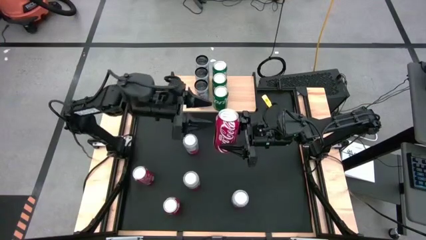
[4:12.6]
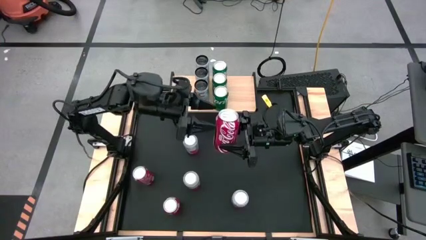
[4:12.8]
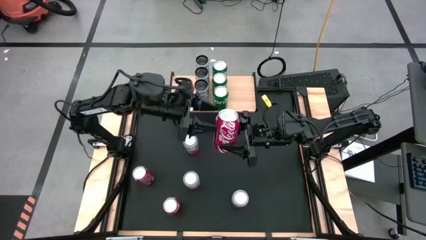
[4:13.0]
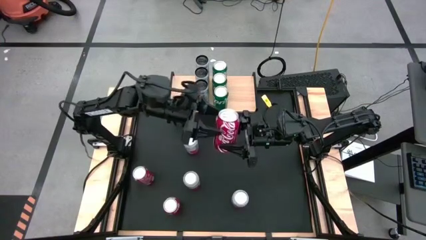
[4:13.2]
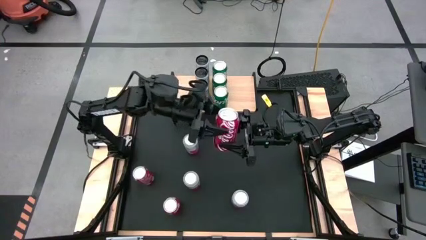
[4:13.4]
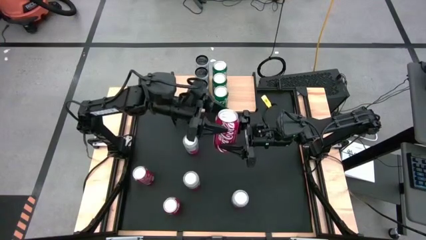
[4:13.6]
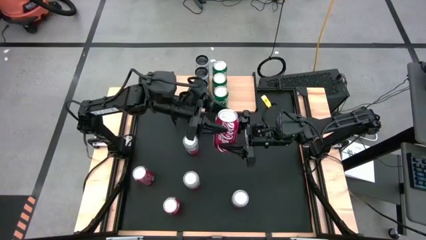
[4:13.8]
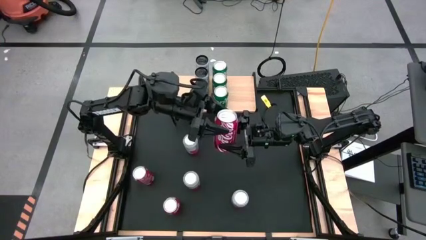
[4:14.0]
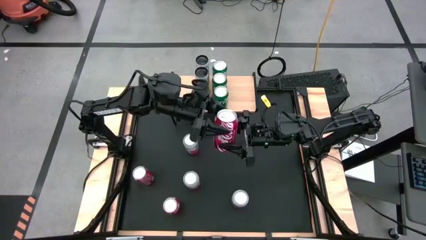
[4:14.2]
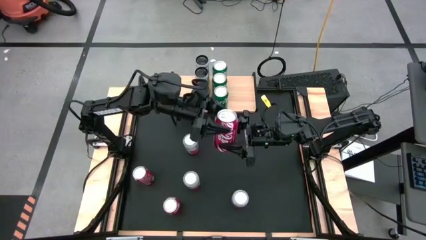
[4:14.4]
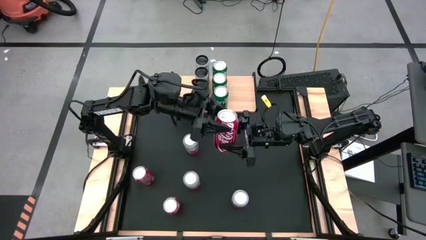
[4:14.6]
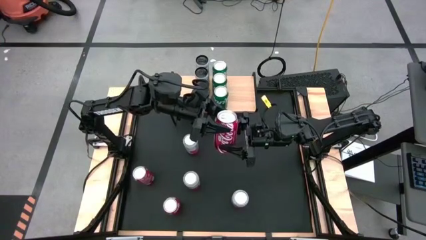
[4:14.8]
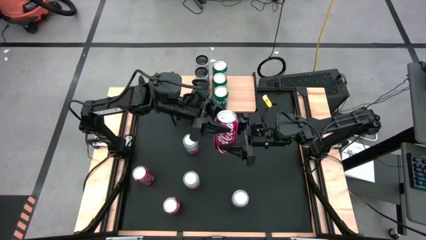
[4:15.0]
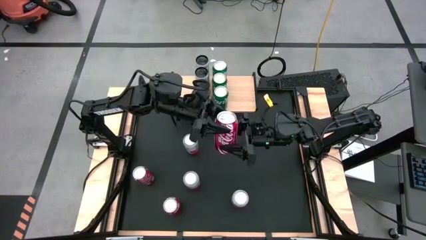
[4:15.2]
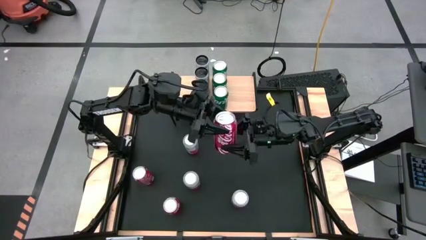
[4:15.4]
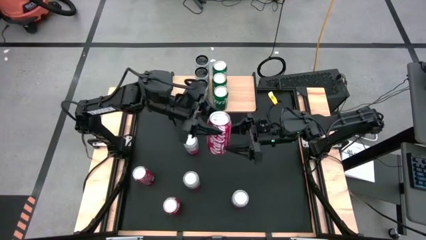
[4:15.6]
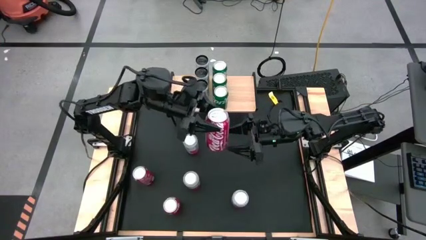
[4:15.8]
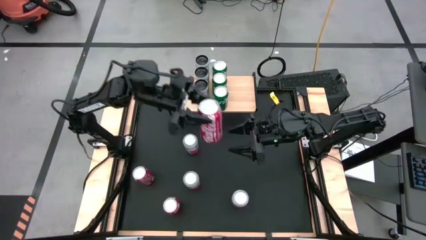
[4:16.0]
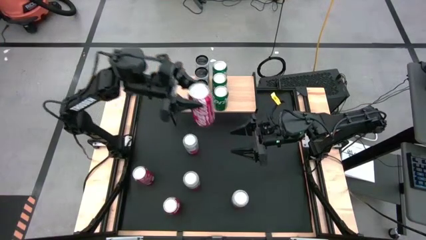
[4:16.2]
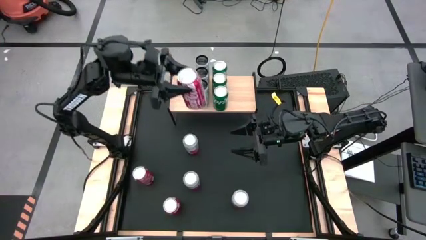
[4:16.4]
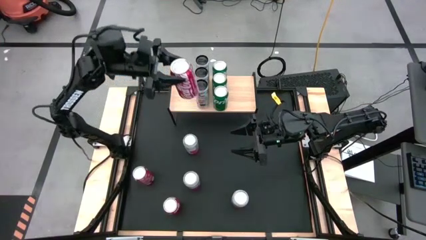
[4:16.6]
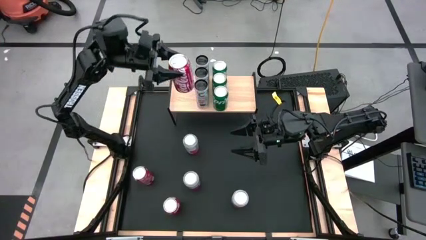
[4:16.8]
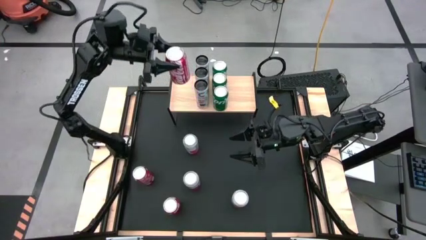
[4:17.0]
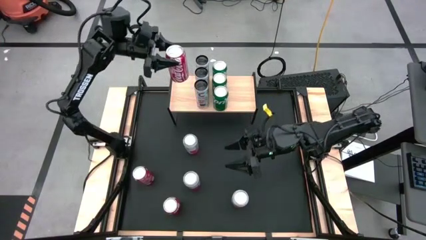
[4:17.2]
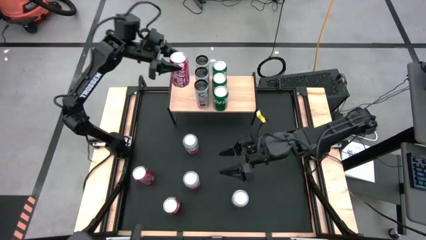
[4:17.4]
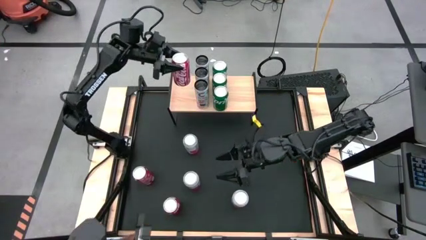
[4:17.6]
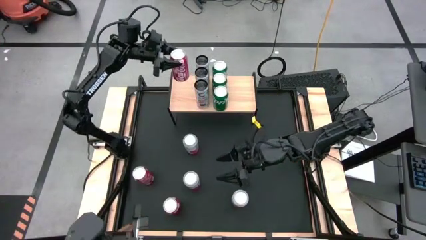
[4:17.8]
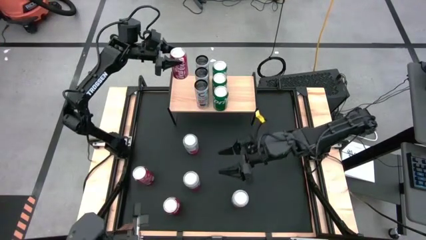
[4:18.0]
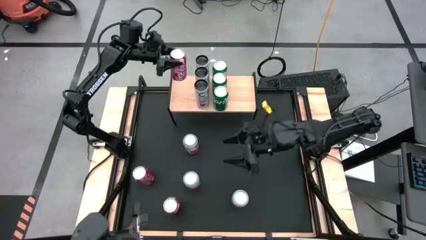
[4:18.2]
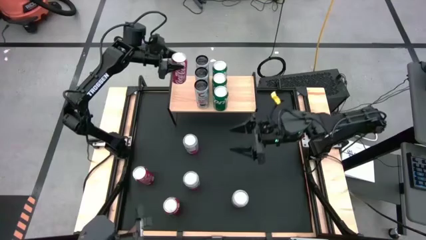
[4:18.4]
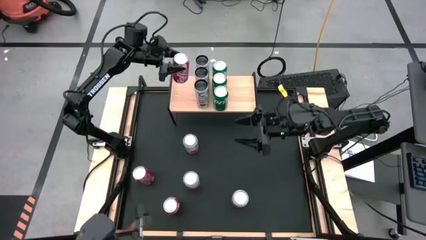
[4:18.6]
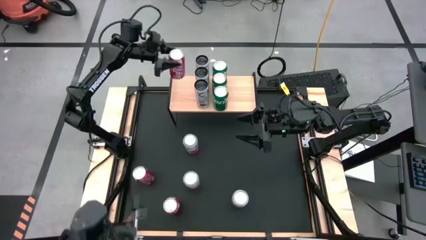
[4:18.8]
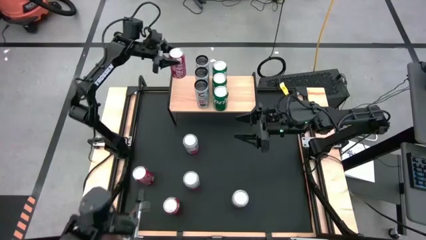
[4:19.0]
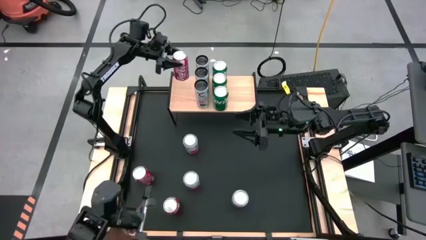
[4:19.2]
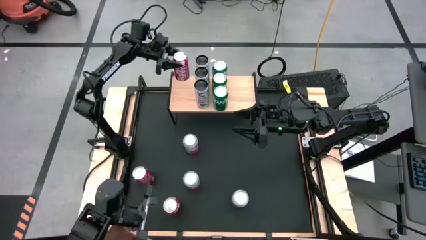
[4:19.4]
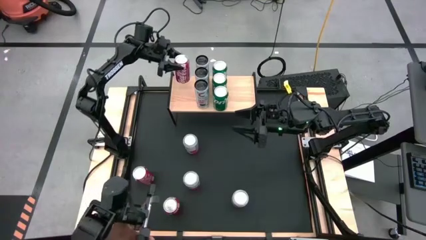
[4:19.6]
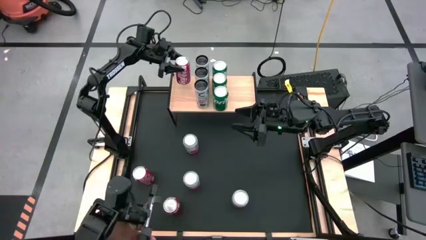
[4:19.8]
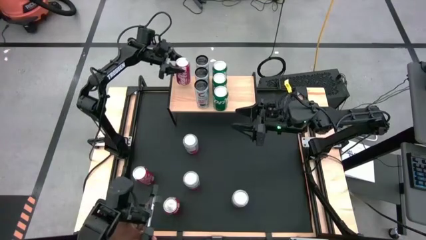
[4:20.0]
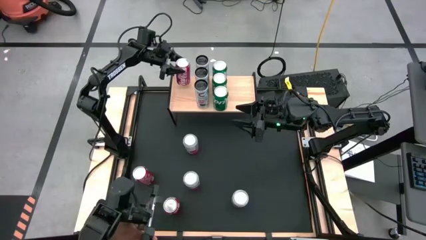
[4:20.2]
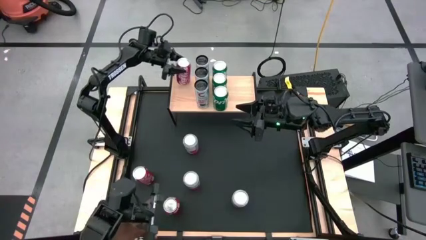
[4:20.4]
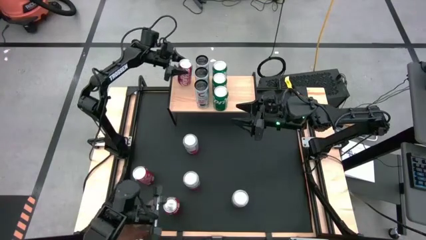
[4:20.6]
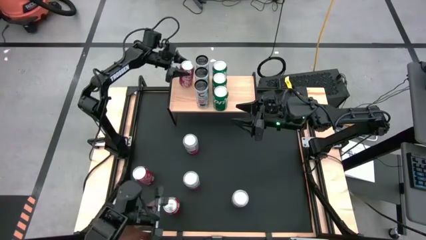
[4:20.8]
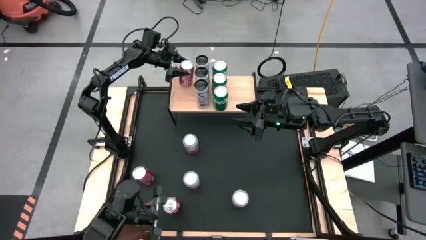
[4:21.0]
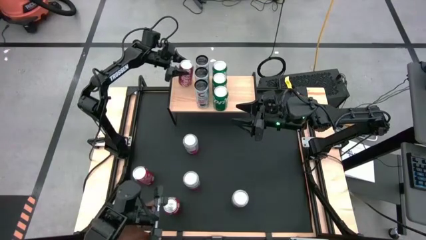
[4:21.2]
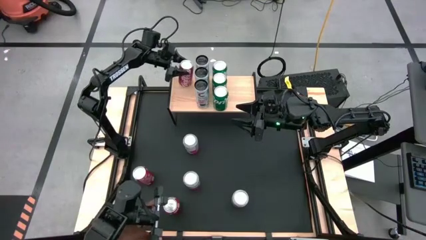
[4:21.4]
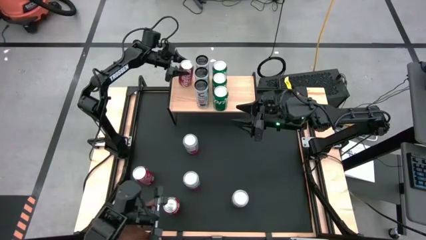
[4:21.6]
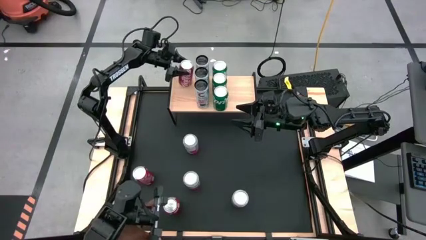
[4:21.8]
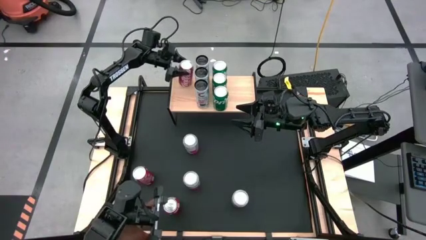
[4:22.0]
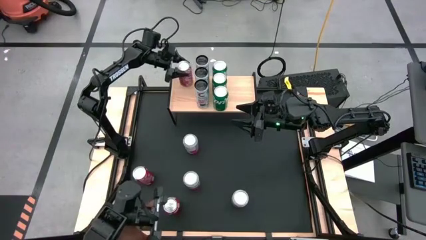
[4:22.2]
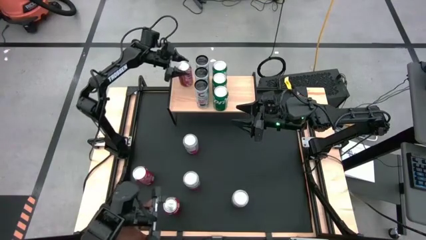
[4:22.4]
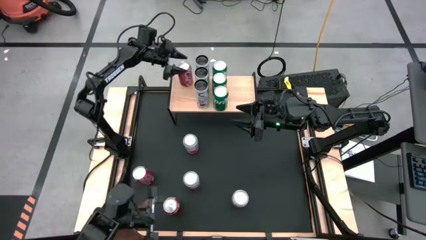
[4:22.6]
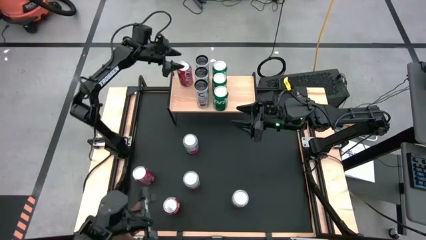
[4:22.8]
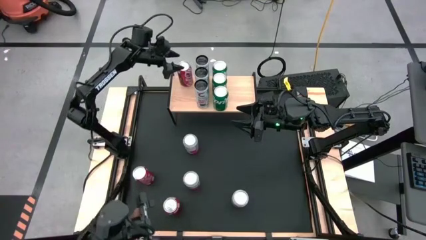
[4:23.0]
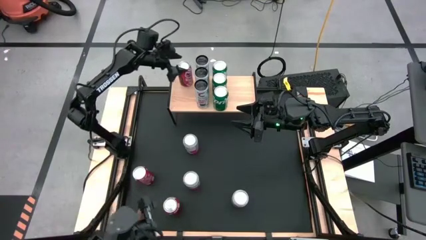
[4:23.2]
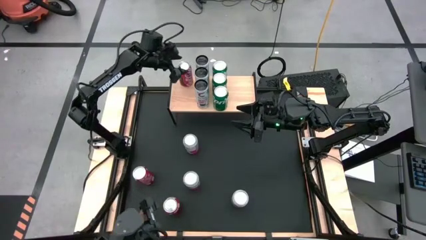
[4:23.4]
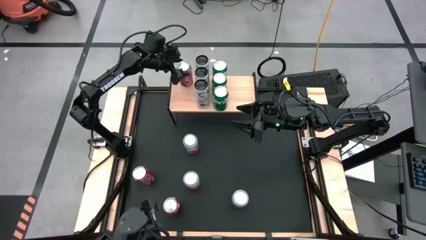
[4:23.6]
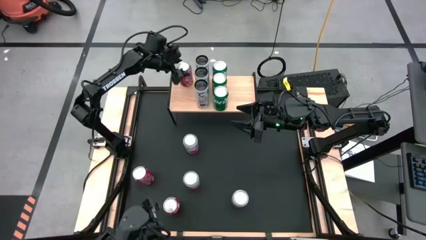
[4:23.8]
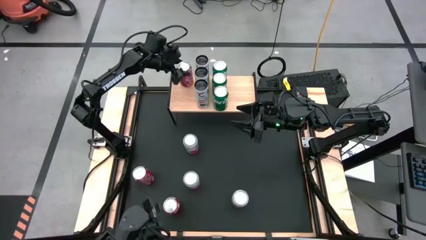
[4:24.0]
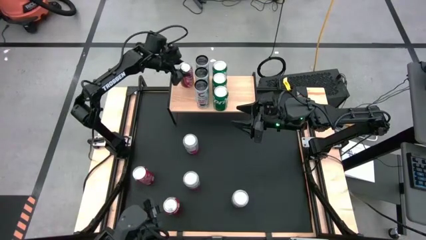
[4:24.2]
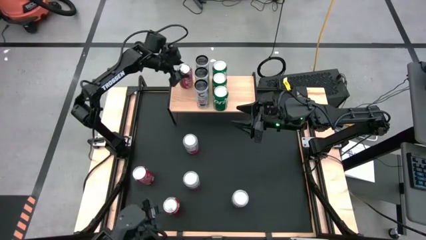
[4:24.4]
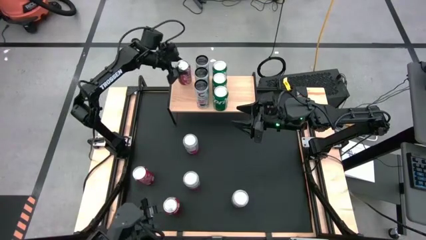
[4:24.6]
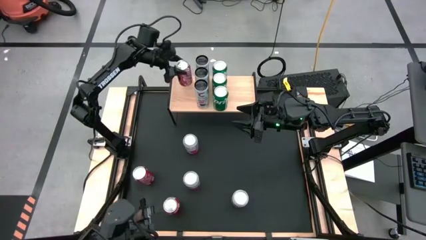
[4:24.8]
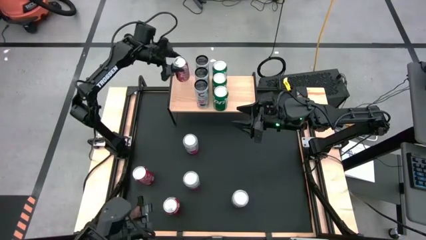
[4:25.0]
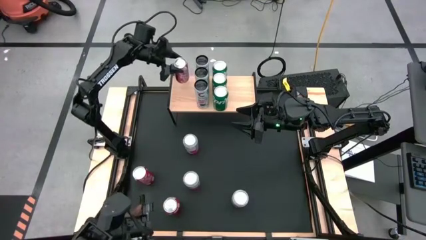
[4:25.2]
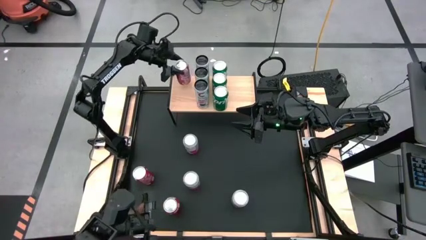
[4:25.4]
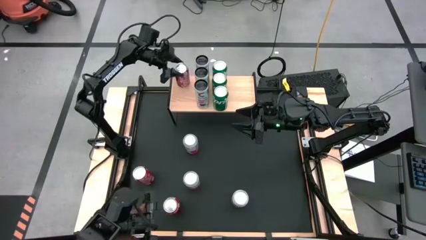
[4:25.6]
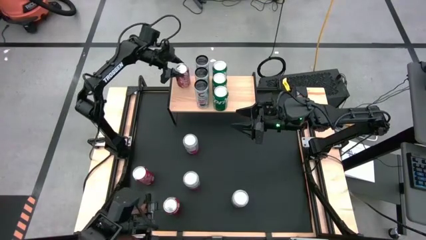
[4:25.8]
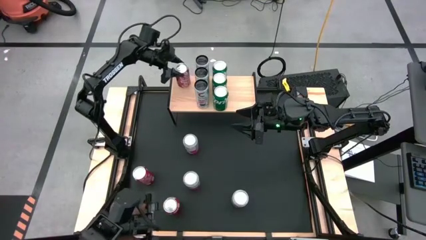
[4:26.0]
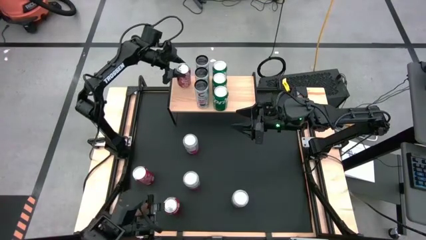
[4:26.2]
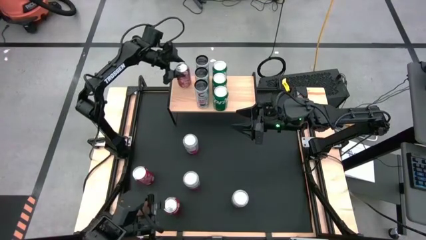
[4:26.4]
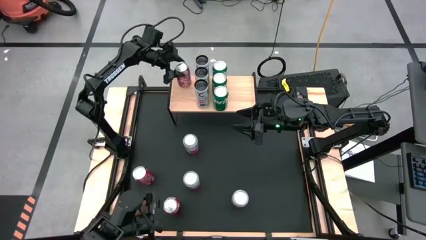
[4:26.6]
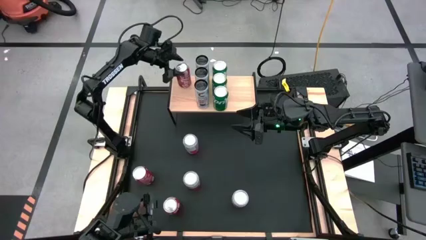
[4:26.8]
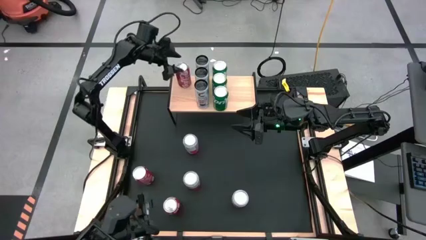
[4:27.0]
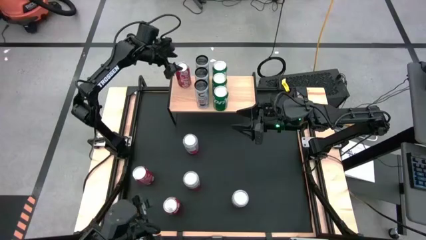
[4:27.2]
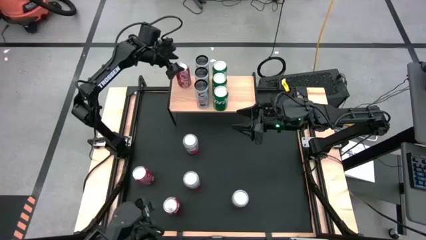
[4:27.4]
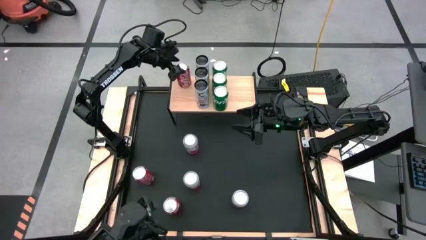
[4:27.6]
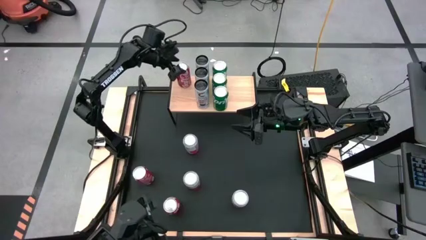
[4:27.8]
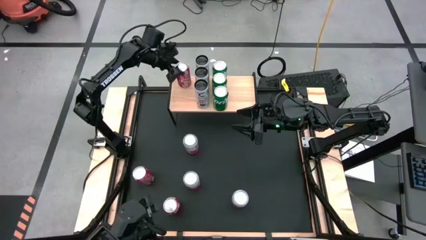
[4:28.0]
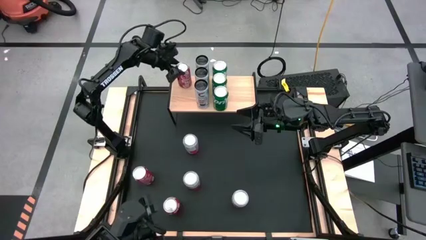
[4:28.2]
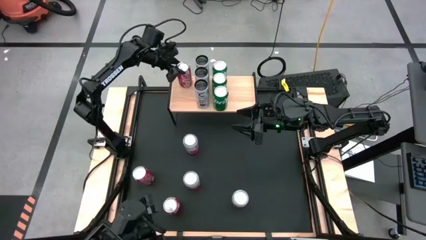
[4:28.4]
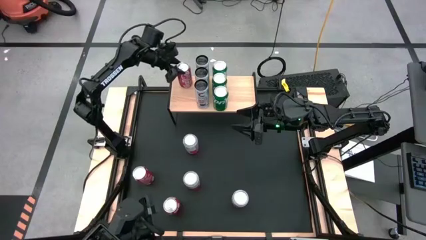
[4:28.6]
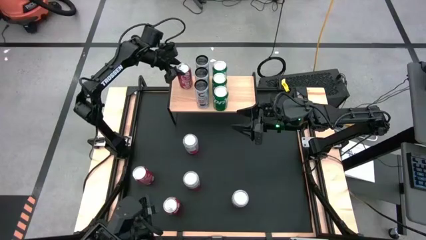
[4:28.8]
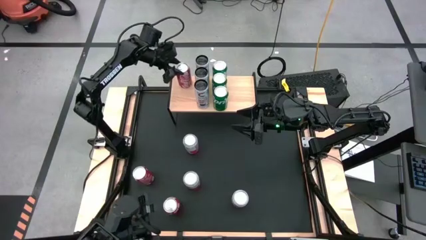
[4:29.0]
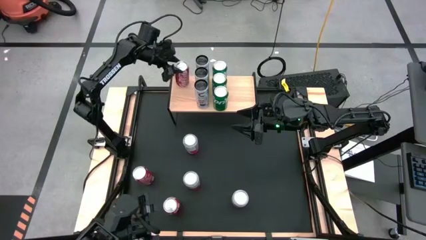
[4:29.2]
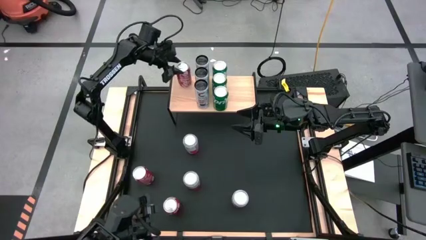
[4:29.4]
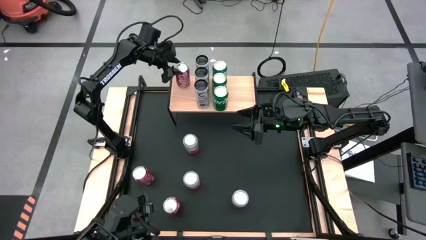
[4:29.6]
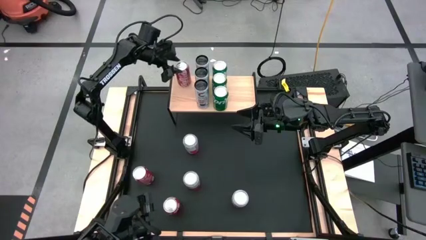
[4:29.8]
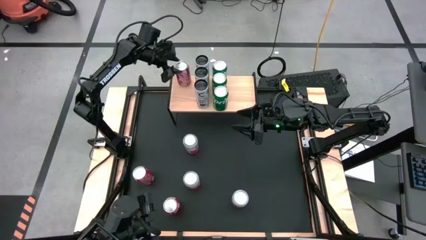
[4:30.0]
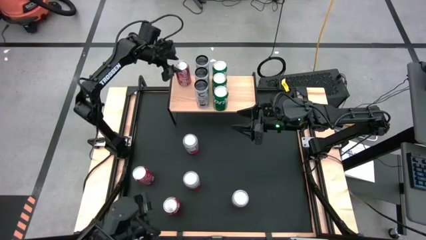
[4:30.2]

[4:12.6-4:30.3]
Task: Place canned beverage on shelf
Put the top right red white soda can on the shelf
